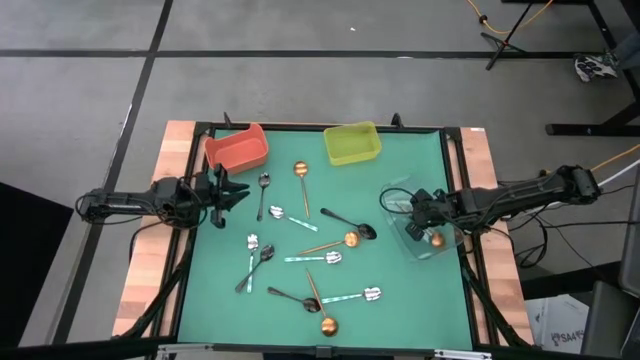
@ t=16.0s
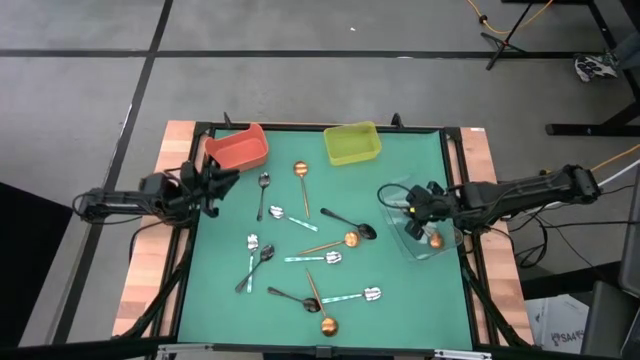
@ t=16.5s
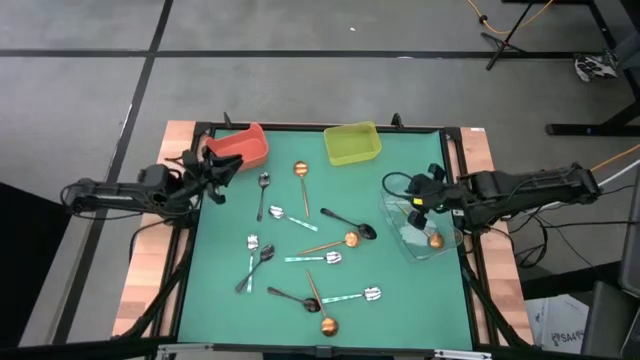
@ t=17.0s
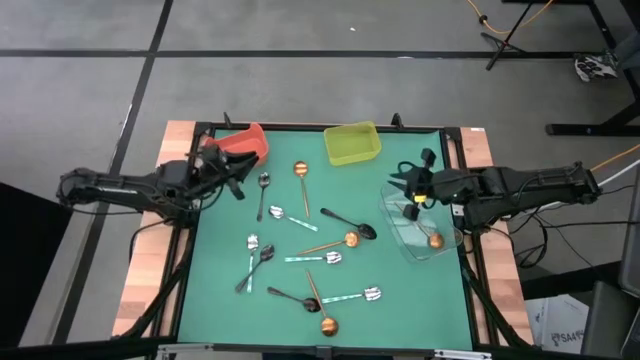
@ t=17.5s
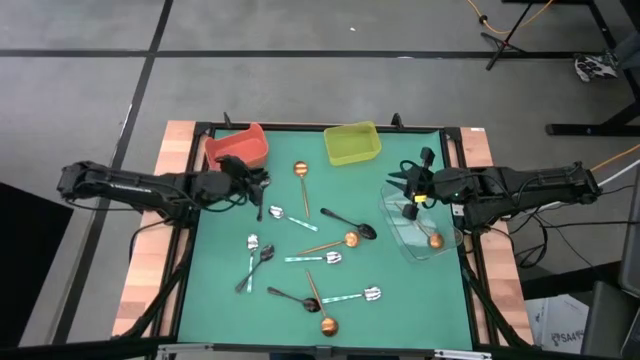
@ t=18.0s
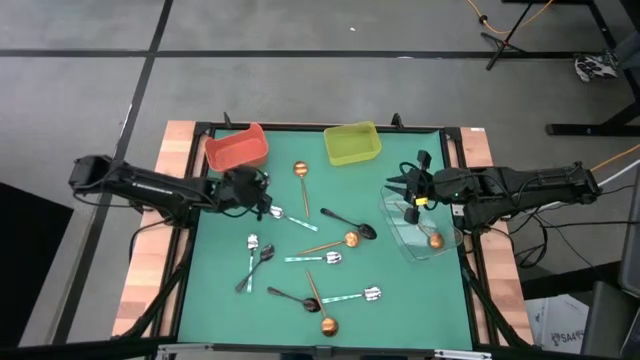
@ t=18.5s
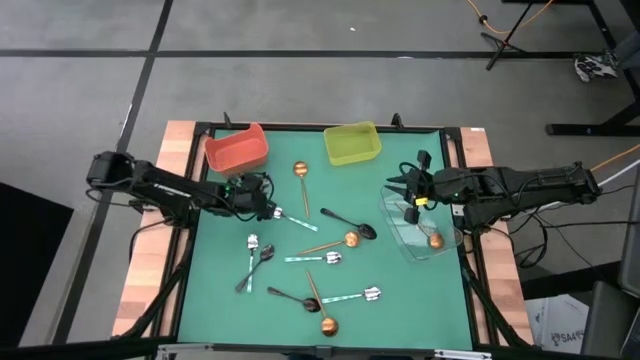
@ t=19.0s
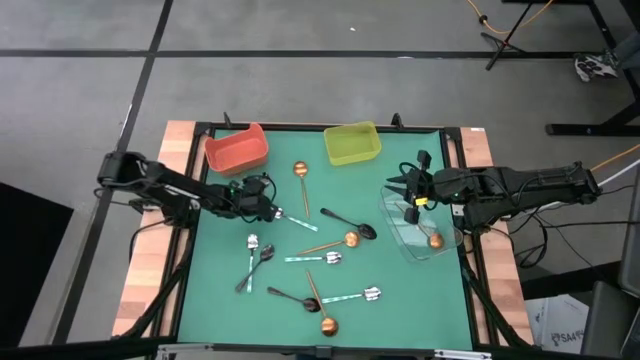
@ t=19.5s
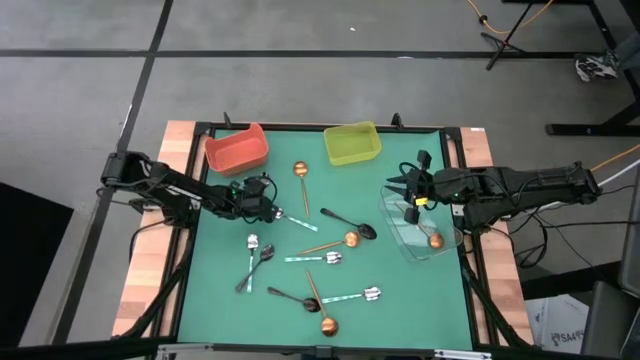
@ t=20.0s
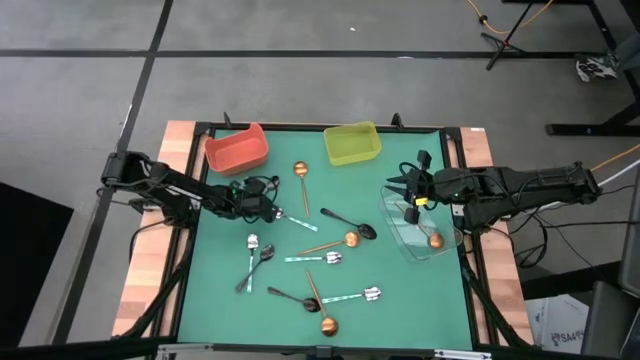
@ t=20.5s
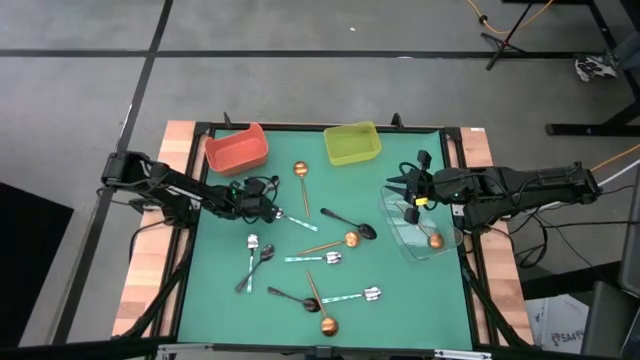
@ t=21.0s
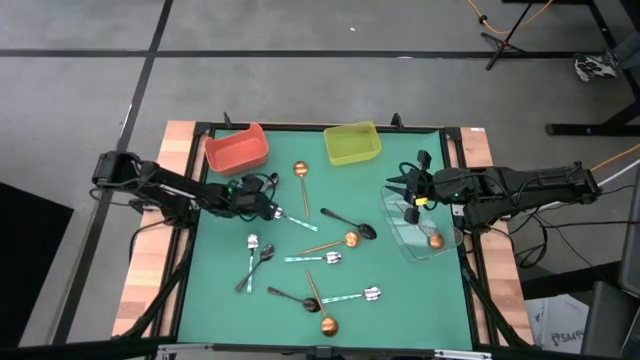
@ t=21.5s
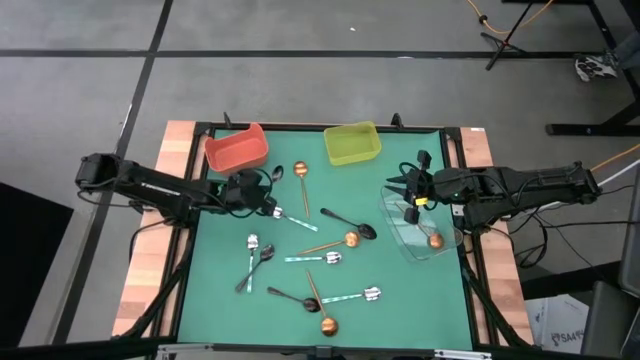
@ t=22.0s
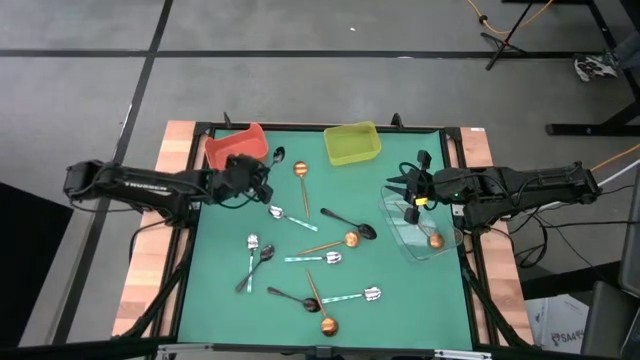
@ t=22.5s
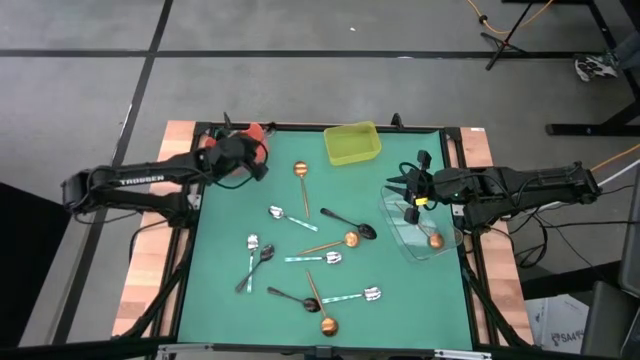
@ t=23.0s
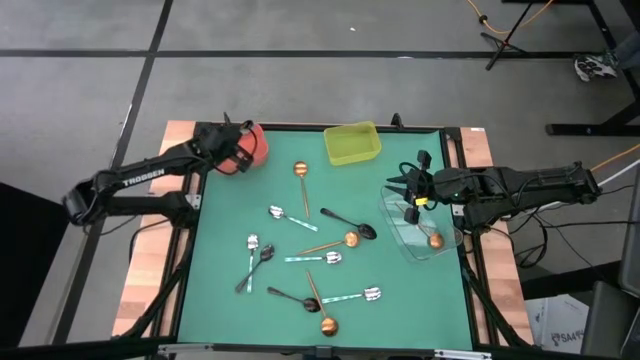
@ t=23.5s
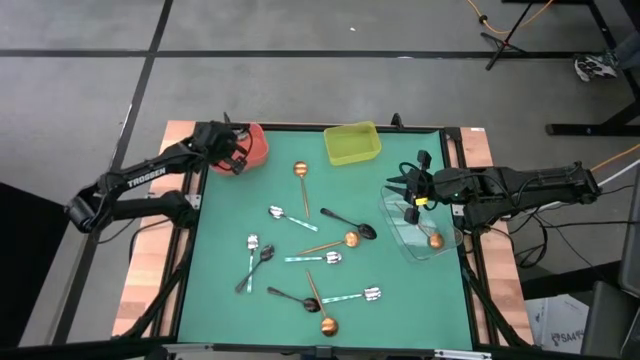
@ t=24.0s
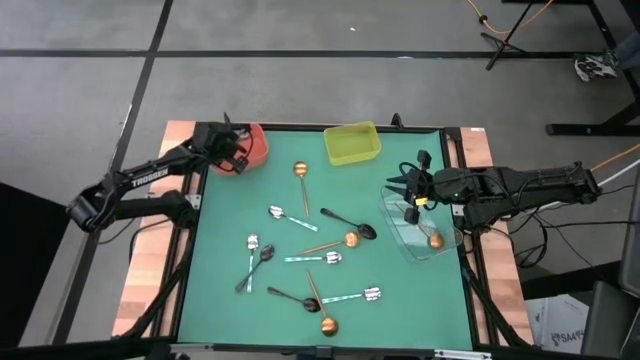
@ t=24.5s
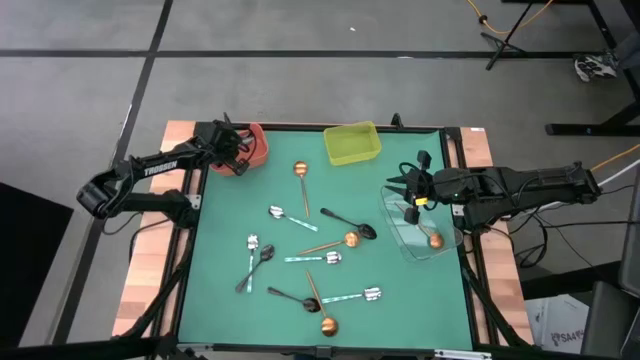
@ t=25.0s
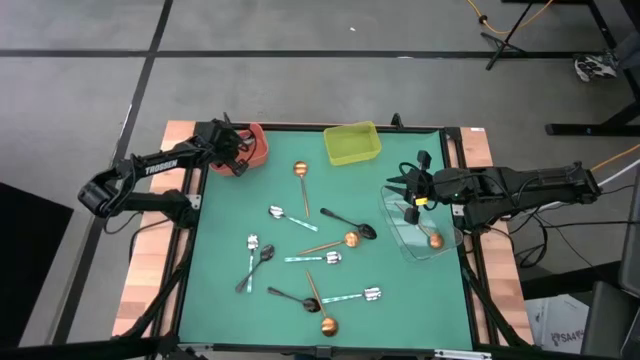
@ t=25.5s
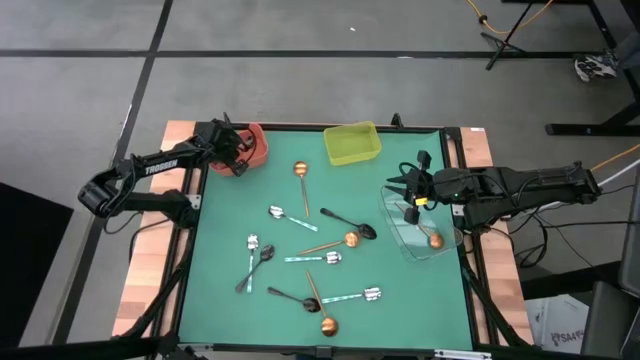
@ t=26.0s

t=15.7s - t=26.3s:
Task: Sort silverware by color (type)
Put the top left black spoon into the orange bin

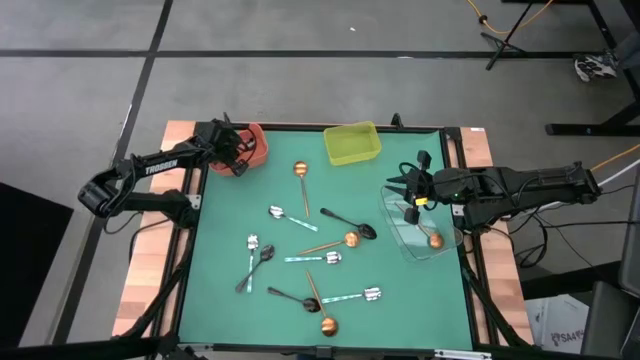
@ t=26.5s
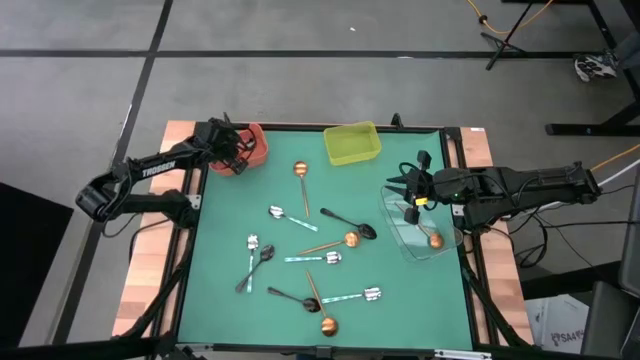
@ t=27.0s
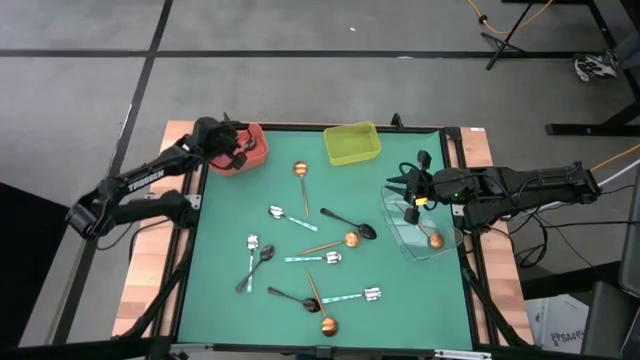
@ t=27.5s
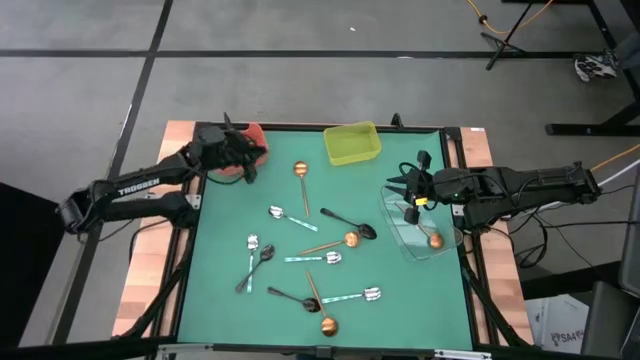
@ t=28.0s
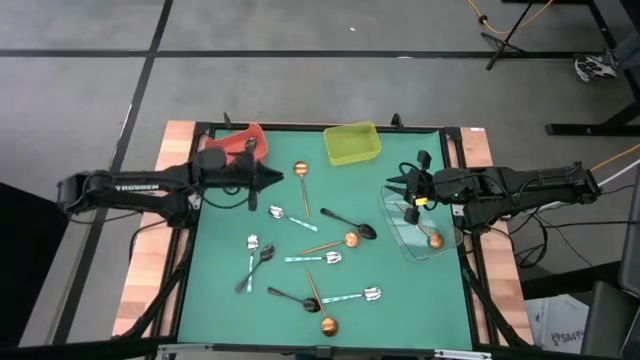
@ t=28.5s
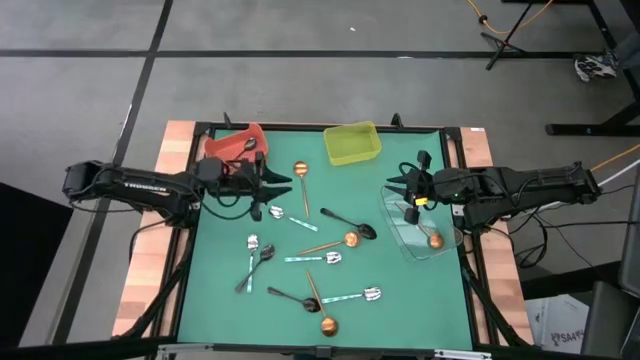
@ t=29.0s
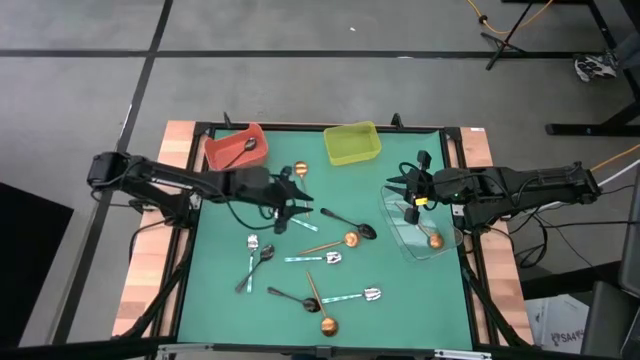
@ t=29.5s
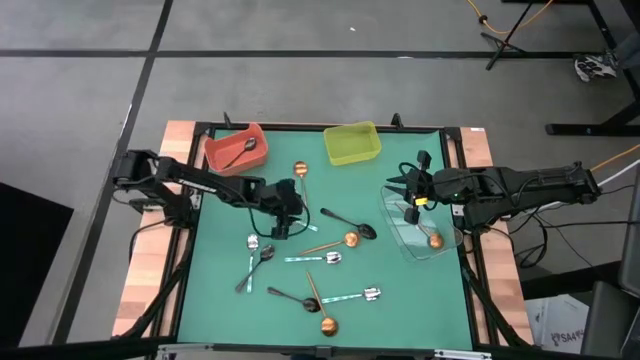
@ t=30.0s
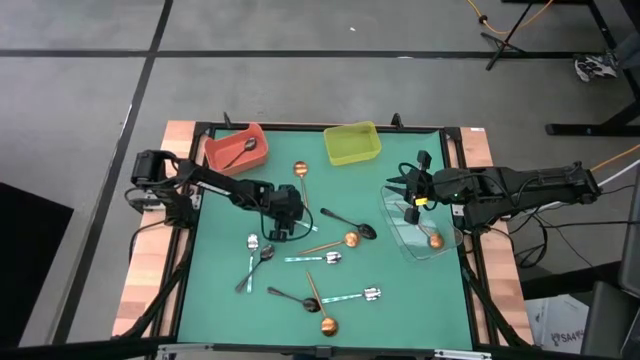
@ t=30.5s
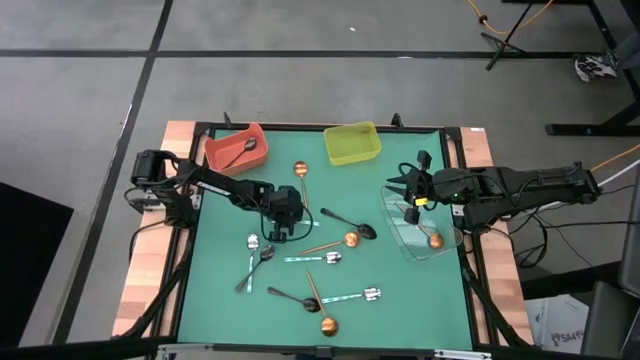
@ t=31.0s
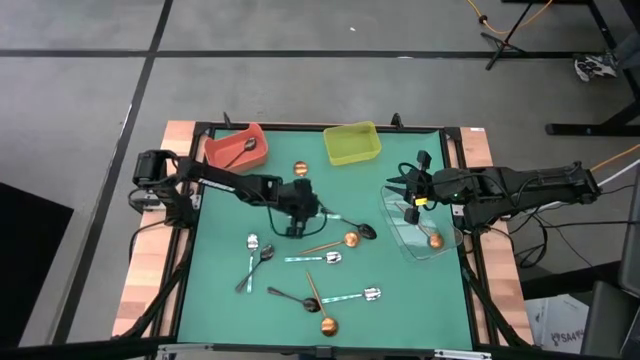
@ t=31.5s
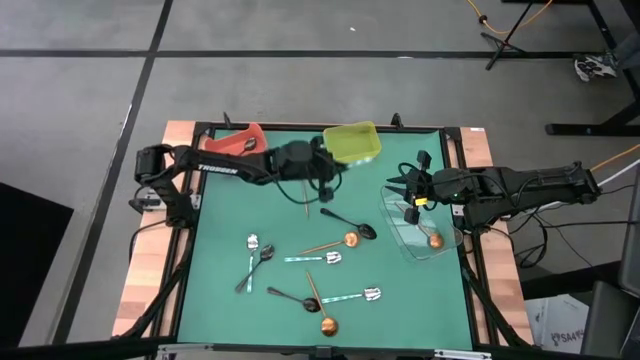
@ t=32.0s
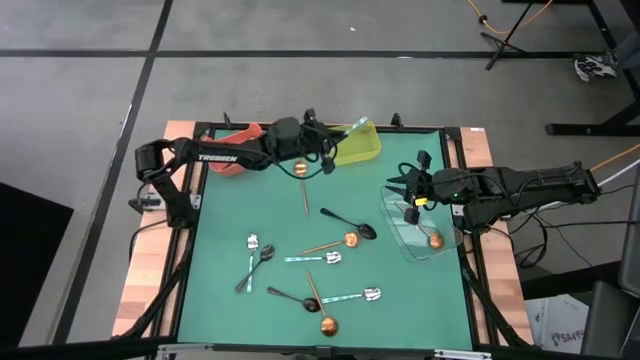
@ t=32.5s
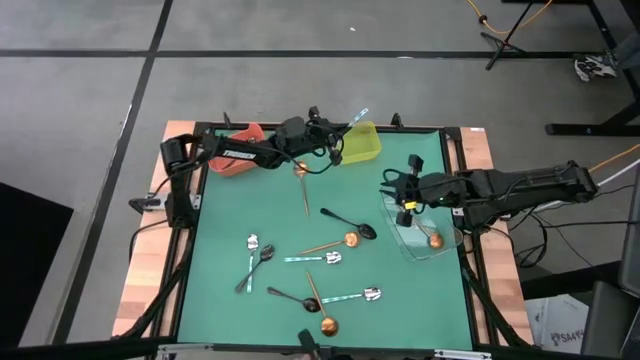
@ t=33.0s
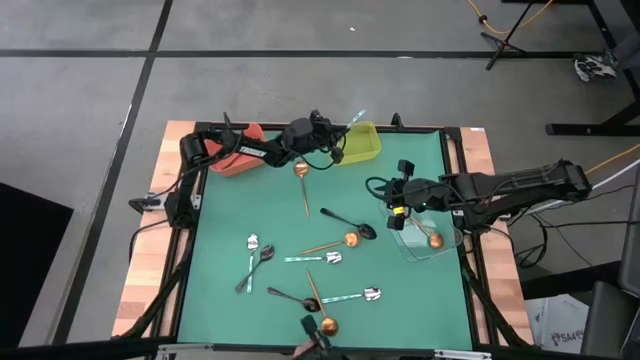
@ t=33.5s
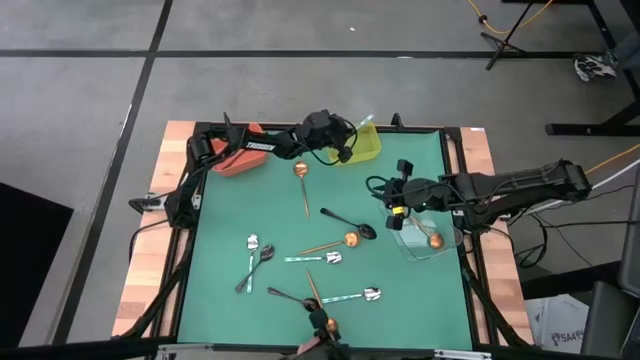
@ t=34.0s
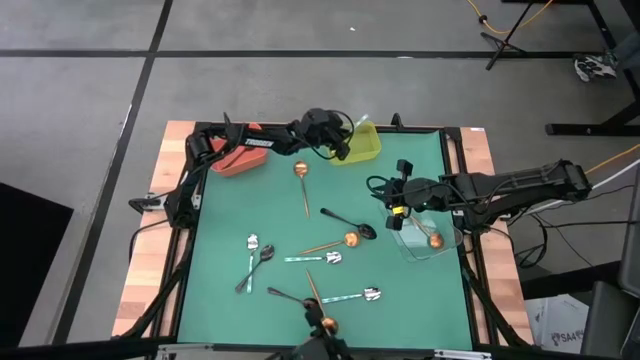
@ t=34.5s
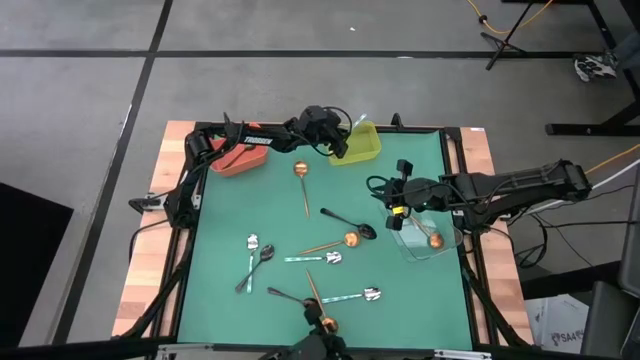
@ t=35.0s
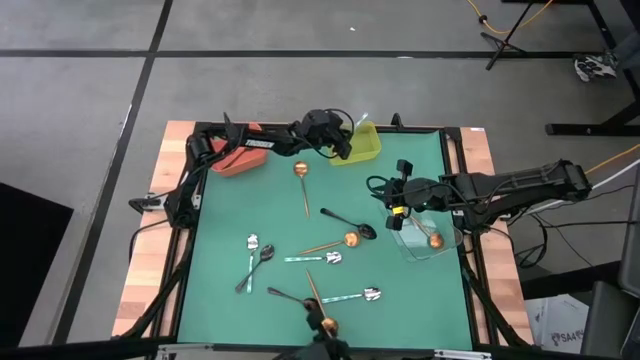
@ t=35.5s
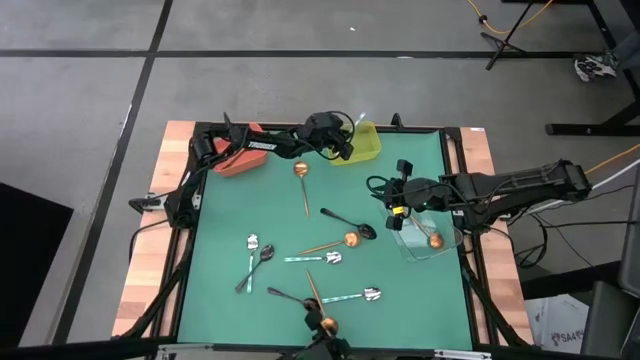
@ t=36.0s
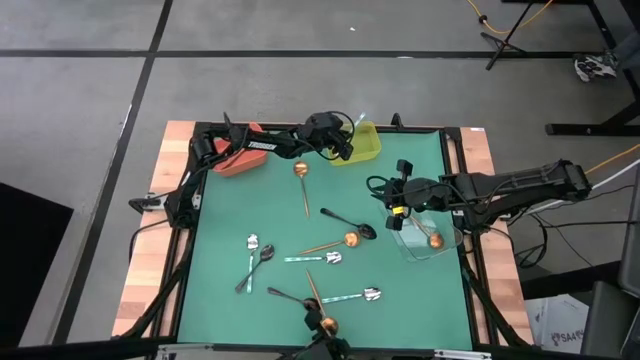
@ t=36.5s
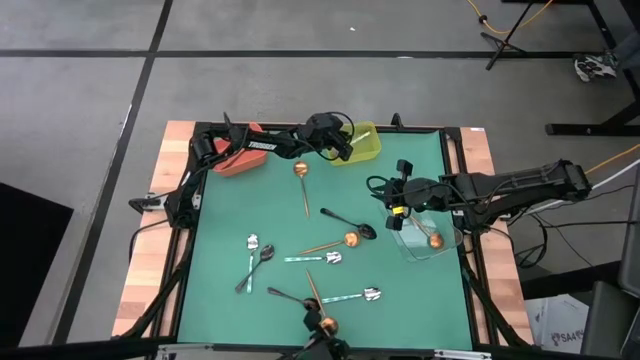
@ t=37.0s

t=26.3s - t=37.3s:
Put the top center white and green spoon into the yellow bin
